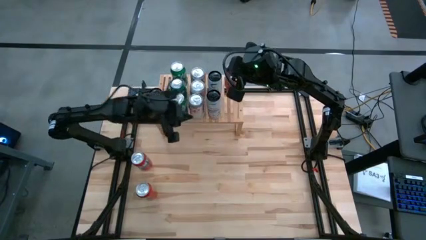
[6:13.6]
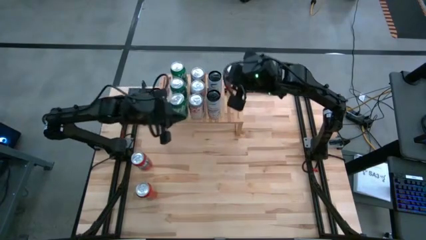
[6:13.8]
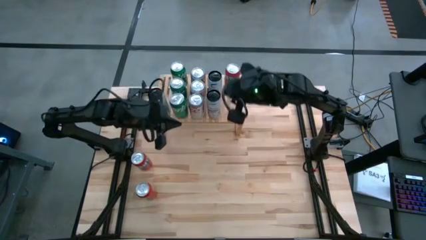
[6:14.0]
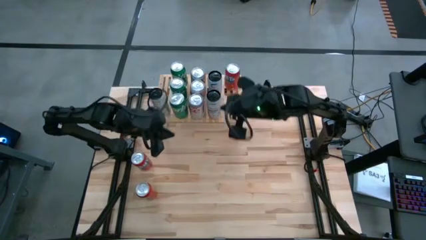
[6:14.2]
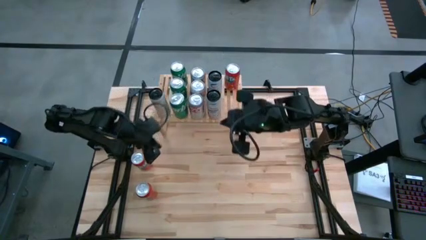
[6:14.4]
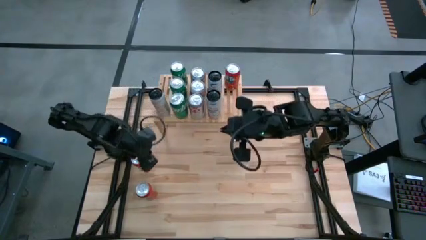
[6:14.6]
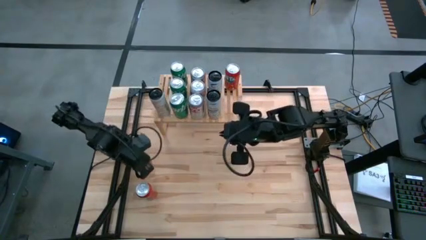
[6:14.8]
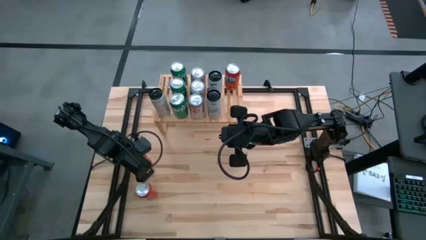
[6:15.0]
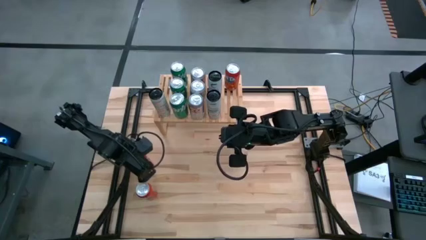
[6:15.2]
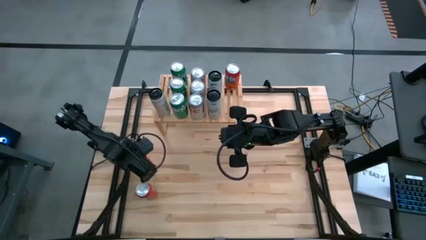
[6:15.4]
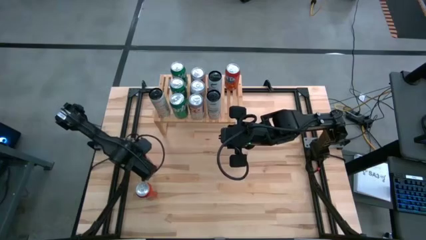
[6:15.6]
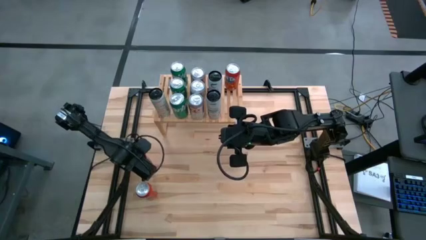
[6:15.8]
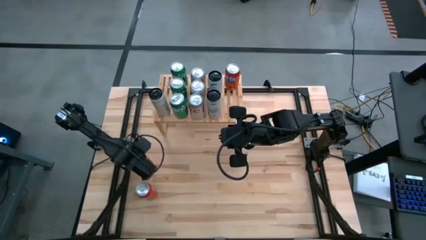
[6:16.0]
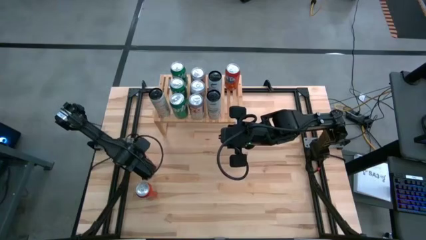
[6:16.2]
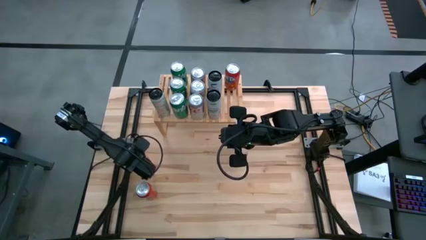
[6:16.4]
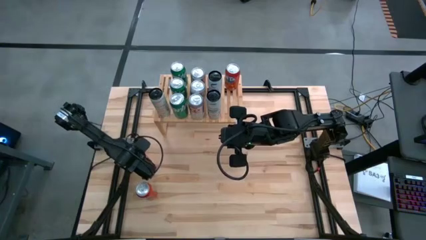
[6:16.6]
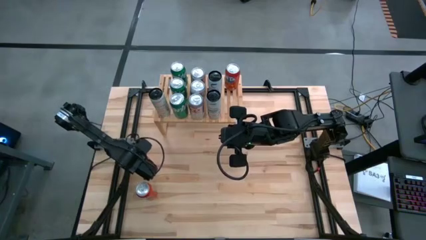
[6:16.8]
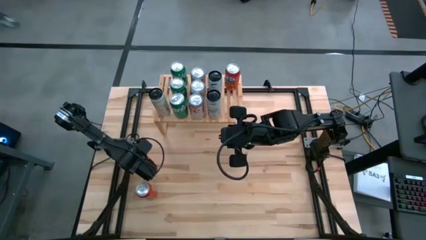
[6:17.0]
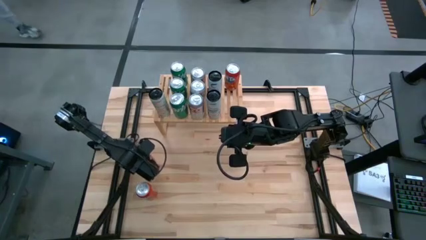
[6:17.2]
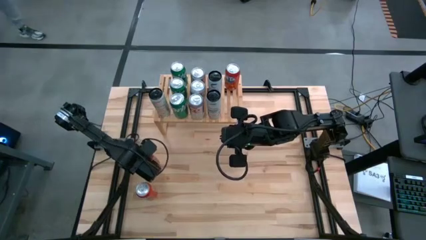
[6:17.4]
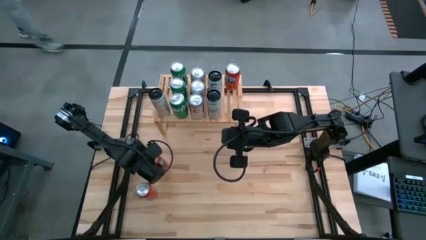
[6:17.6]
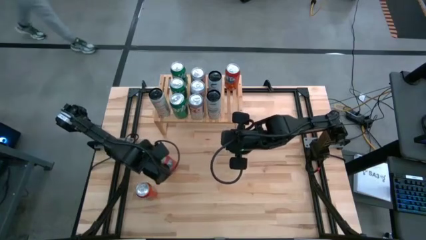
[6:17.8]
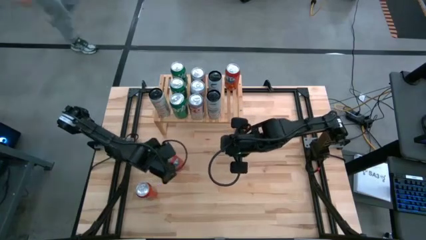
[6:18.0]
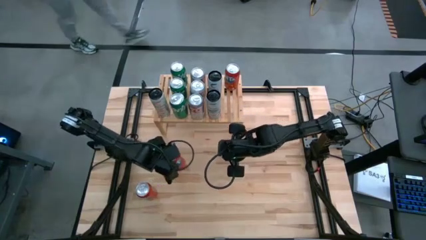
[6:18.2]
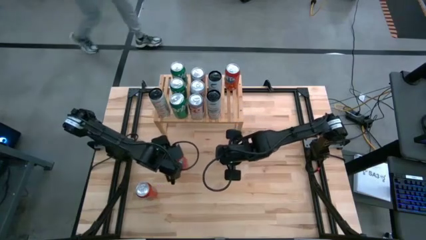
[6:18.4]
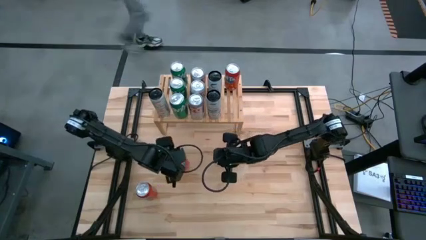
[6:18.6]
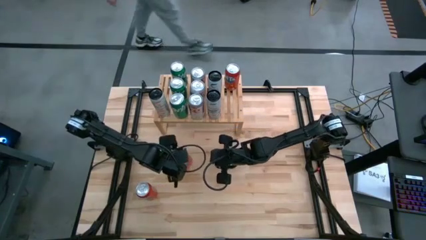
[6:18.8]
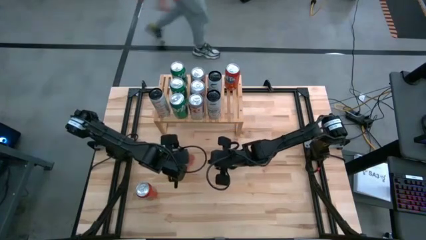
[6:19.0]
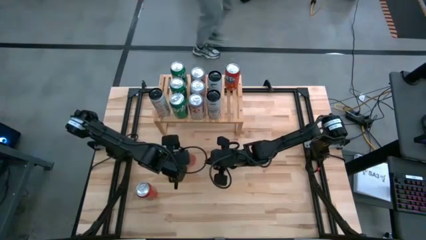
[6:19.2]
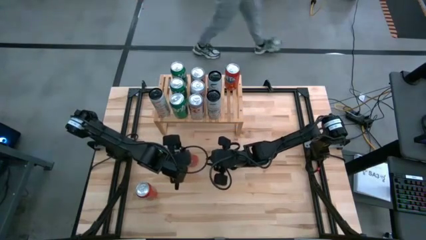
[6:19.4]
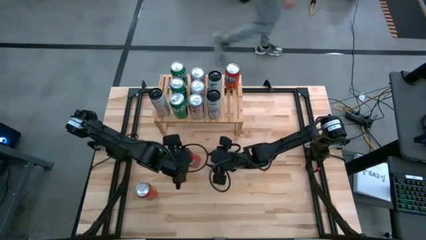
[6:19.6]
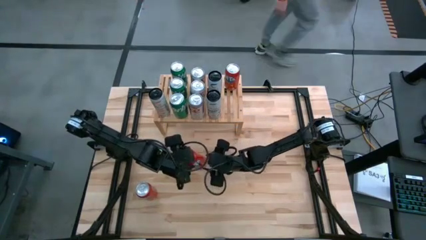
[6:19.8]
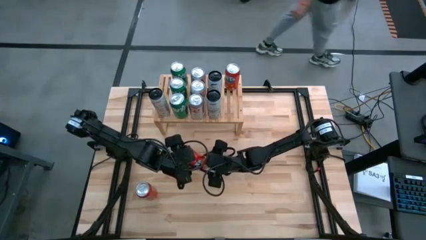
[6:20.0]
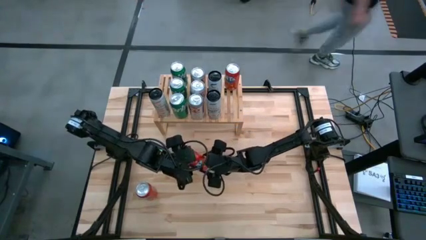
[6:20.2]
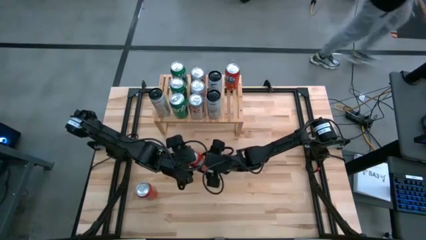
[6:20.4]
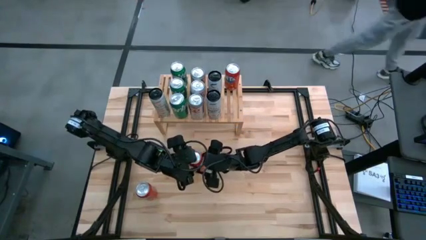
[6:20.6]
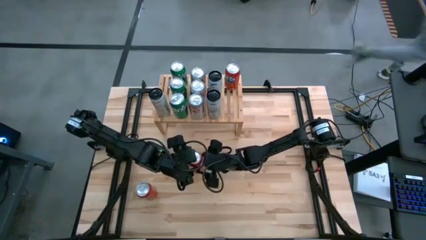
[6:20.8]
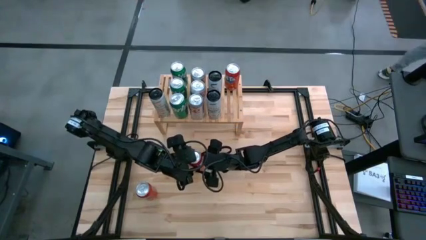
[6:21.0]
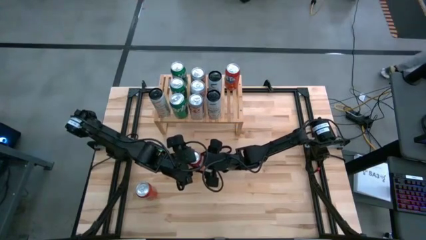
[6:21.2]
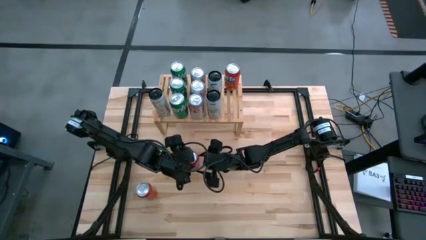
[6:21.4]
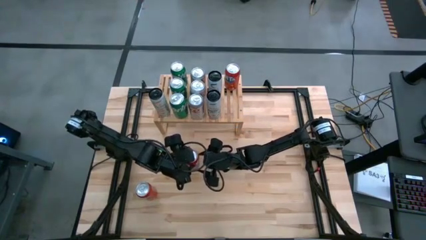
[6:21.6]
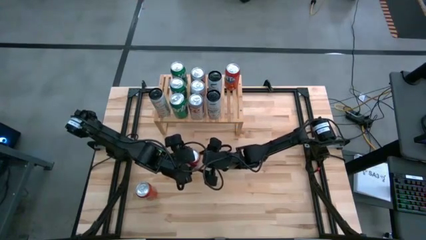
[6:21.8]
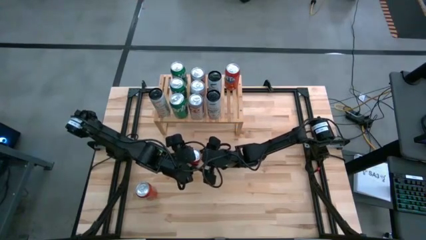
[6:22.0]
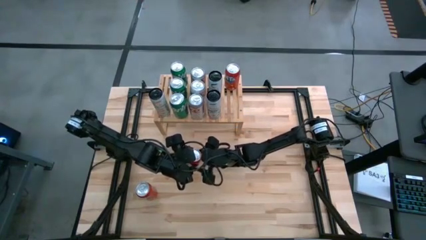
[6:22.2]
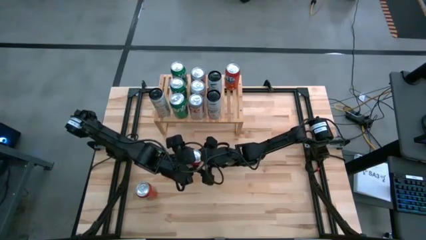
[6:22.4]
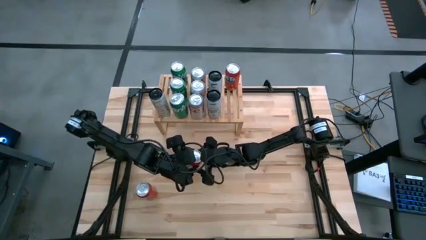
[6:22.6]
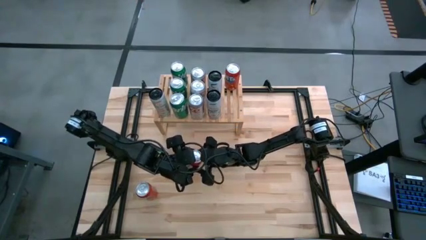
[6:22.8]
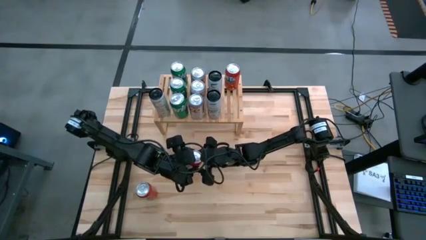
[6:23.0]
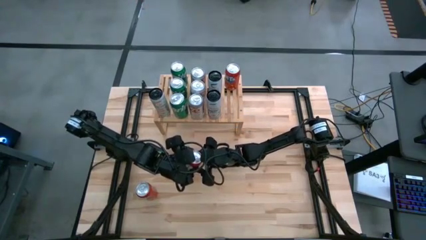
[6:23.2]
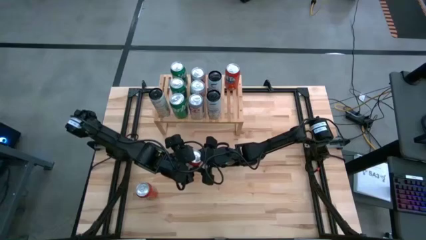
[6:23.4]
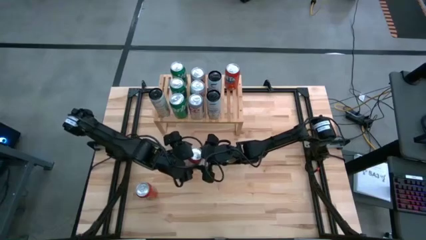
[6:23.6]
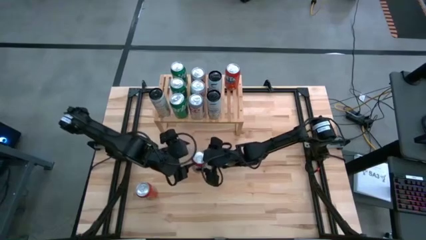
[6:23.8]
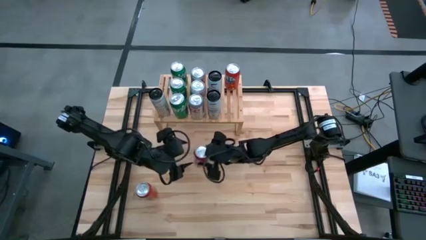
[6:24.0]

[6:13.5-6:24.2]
Task: Place canned beverage on shelf
Put the top left orange soda can on the shelf

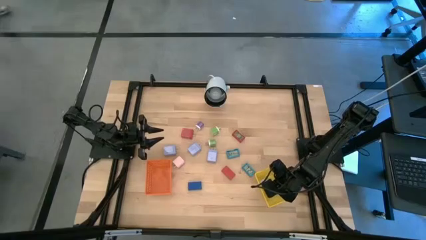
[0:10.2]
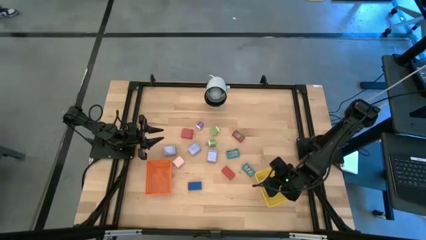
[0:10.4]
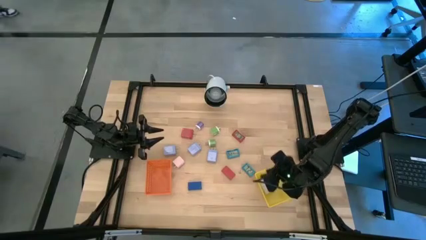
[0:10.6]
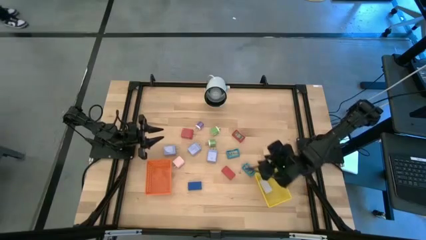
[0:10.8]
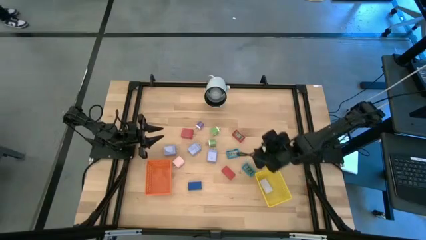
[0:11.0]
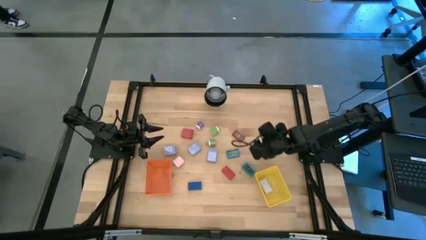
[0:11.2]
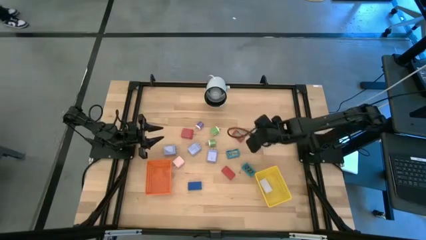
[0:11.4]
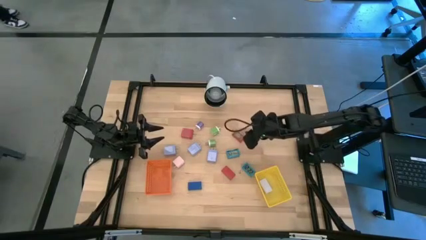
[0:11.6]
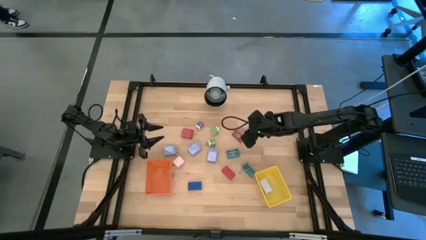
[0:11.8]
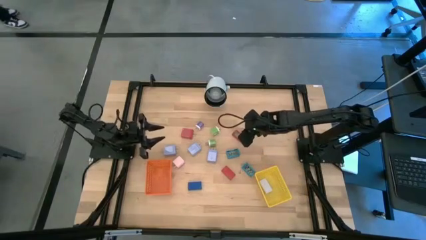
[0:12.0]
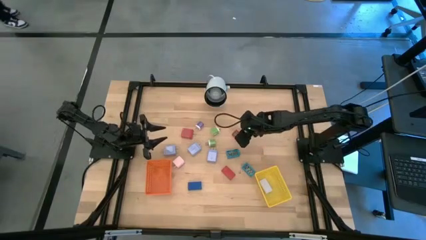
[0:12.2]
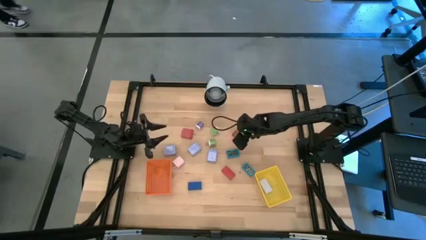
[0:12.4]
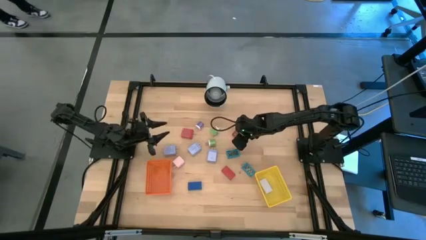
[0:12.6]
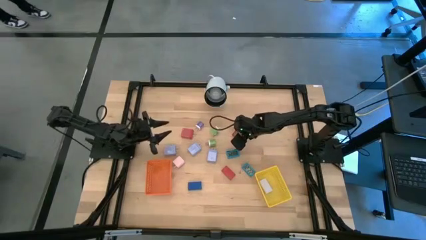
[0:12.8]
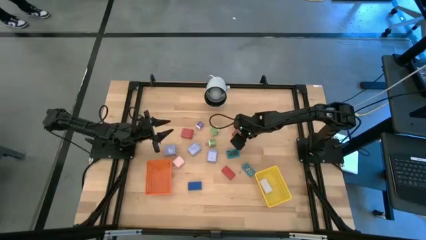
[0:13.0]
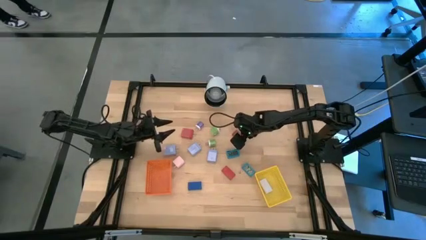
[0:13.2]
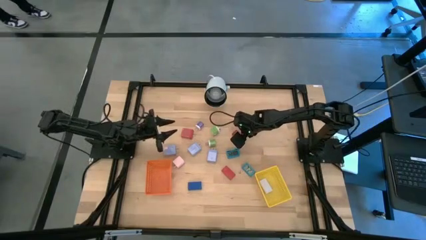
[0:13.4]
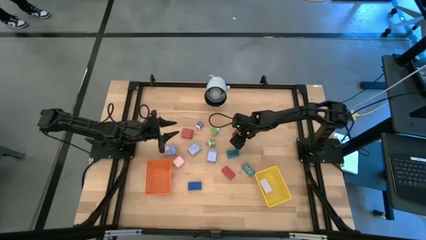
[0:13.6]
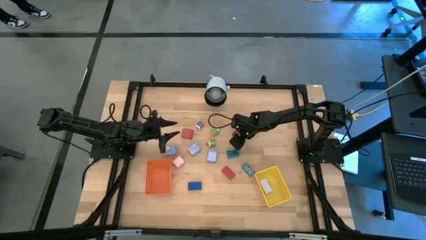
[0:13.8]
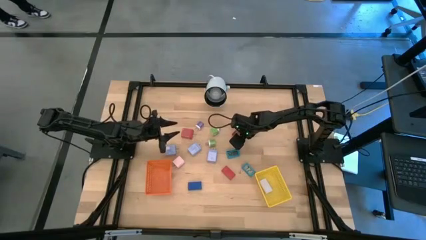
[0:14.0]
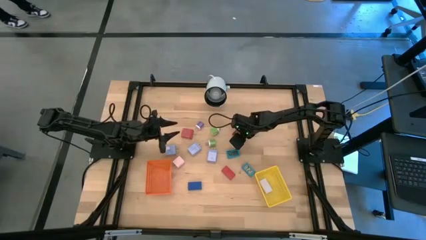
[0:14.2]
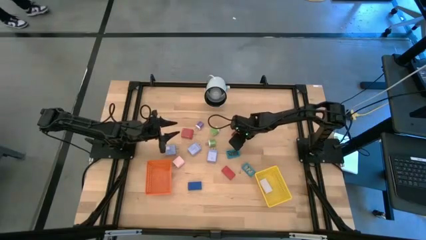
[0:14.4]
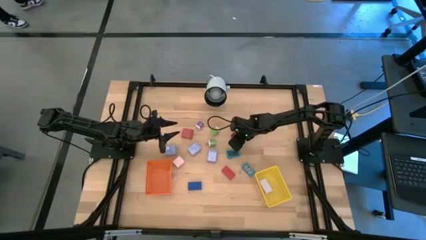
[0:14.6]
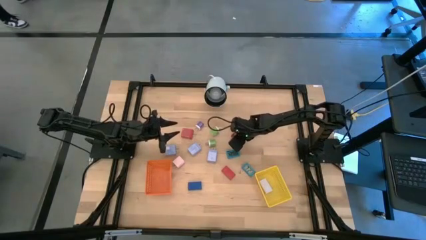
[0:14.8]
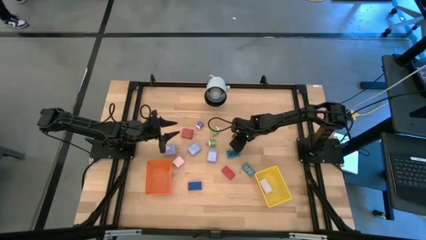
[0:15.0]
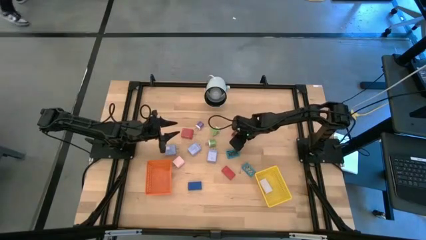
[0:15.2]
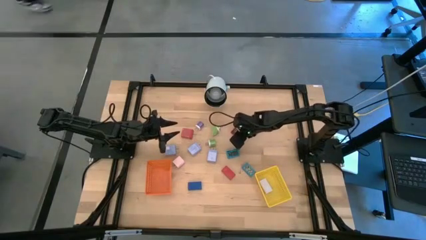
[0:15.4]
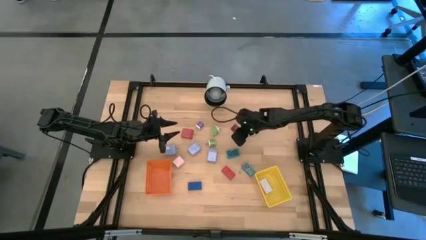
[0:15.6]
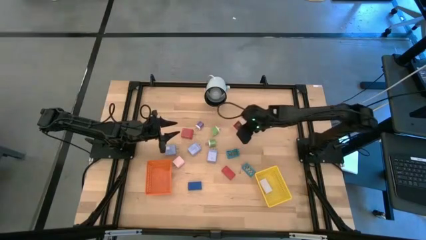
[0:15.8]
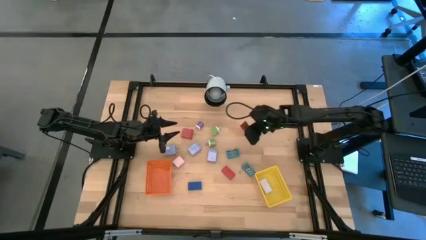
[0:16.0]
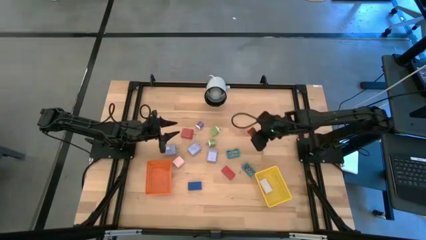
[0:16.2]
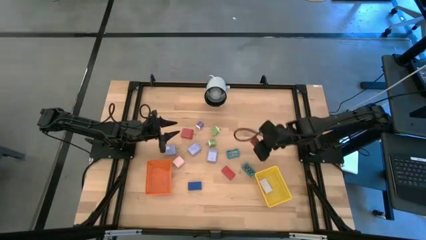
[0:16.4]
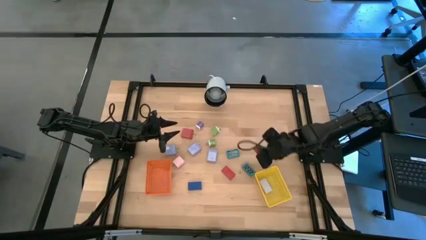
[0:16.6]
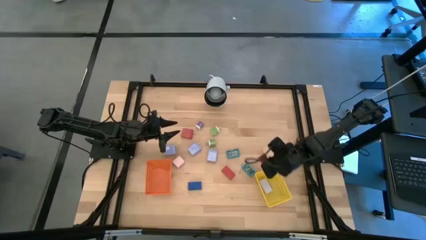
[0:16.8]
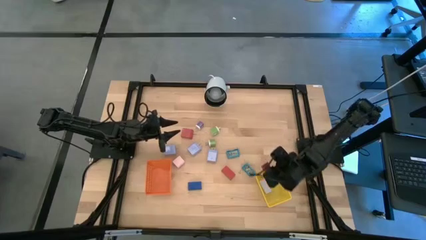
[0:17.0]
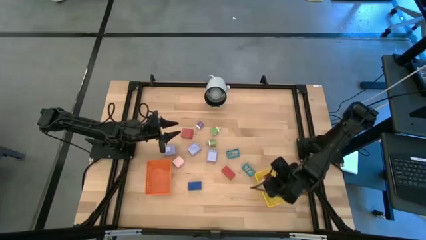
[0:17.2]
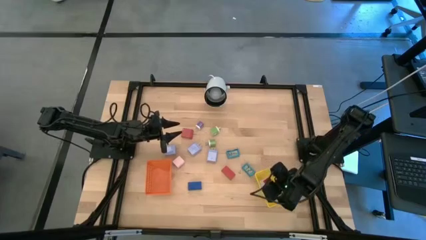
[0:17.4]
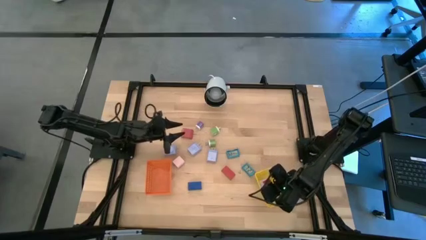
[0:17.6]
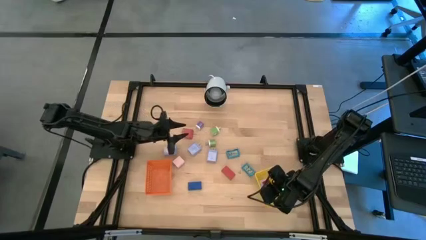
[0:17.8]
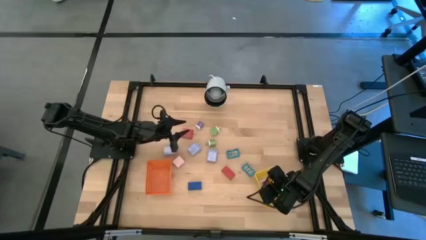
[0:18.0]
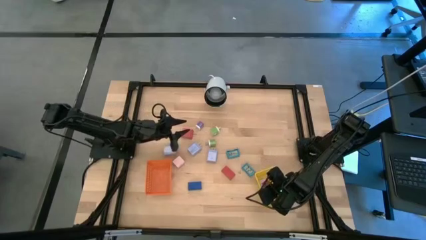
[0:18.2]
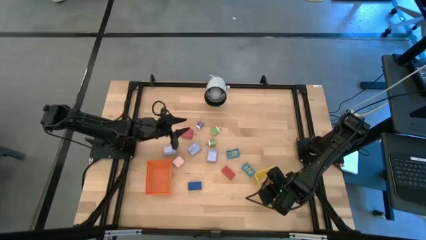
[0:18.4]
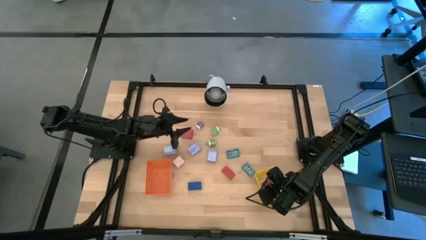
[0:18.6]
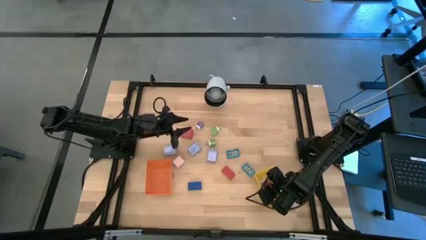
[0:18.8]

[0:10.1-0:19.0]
Task: Pick & Place Office items
Put the top red digital clock into the yellow basket
